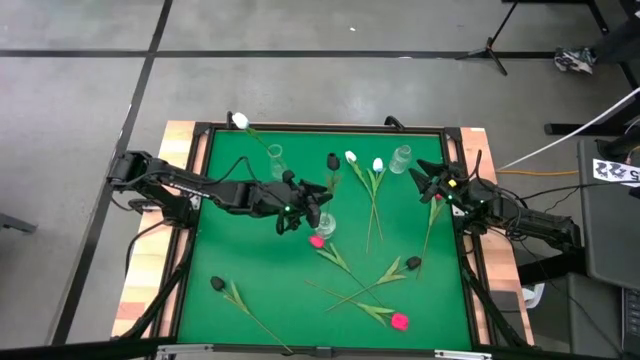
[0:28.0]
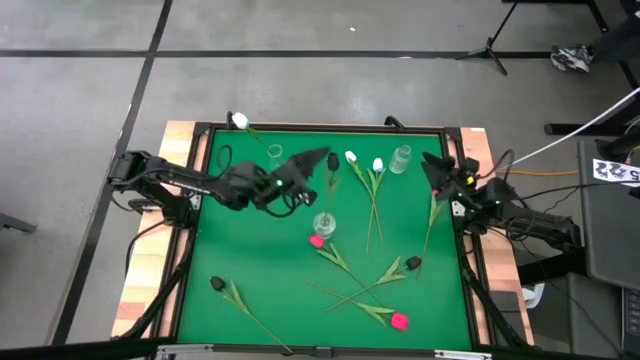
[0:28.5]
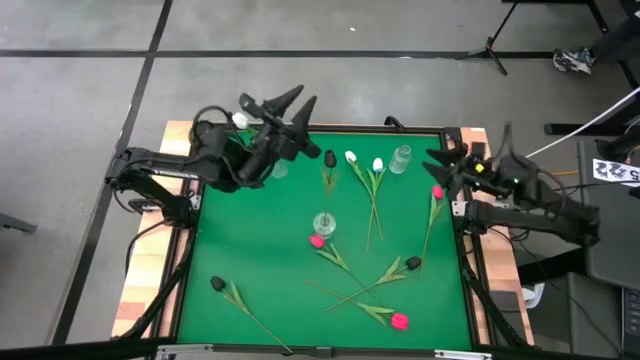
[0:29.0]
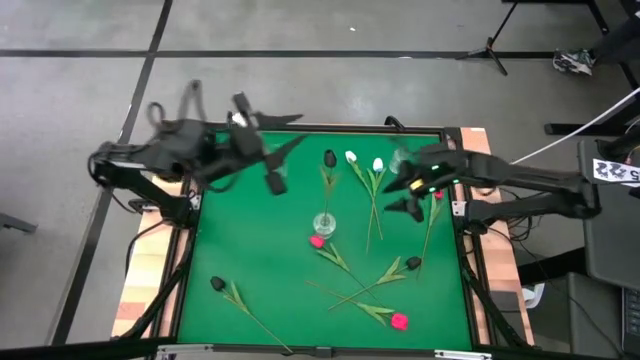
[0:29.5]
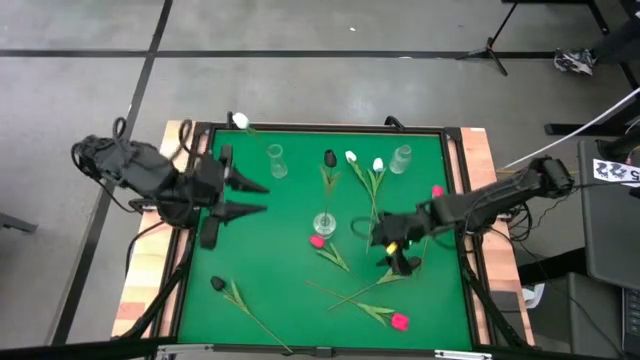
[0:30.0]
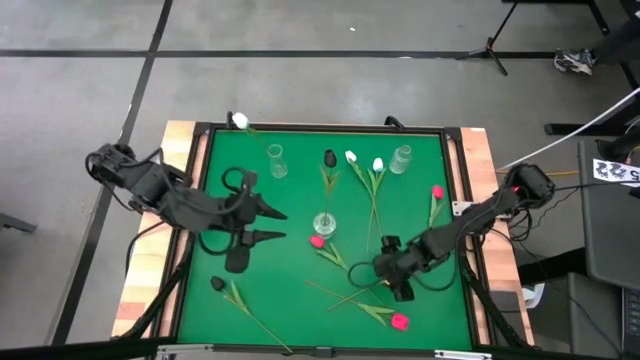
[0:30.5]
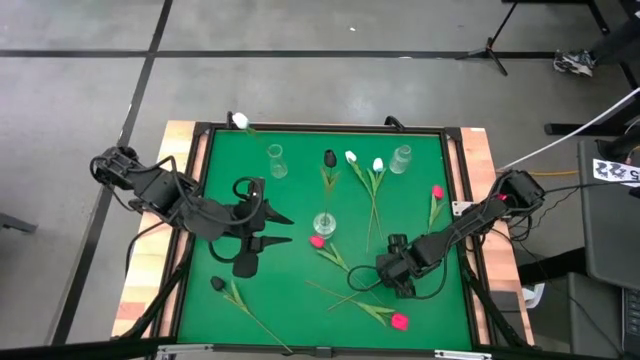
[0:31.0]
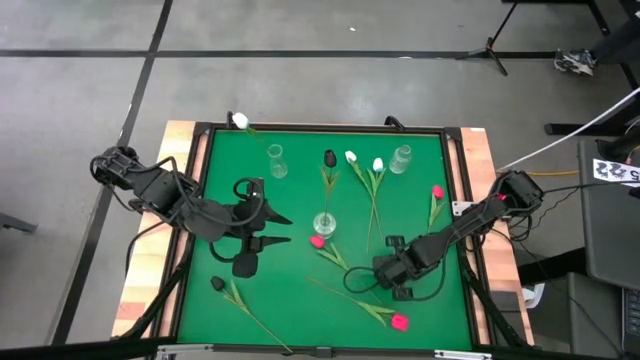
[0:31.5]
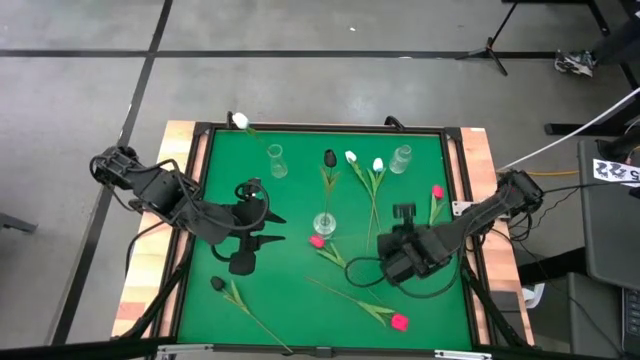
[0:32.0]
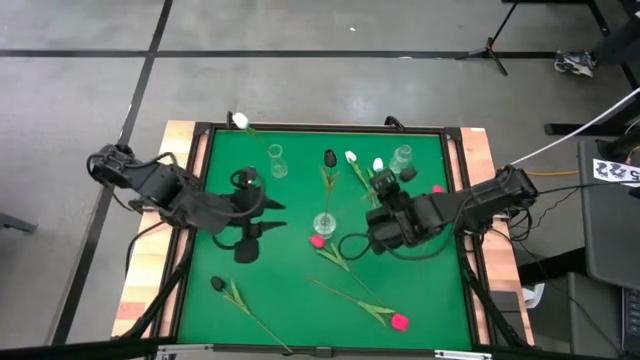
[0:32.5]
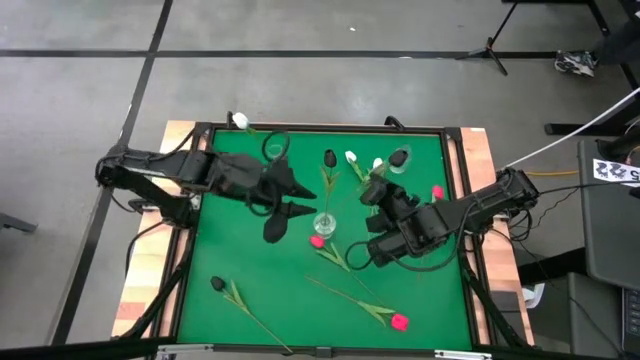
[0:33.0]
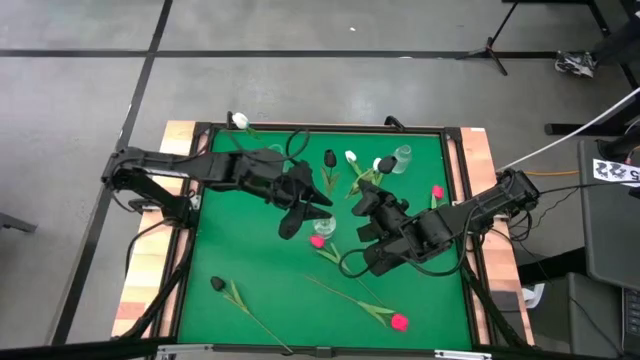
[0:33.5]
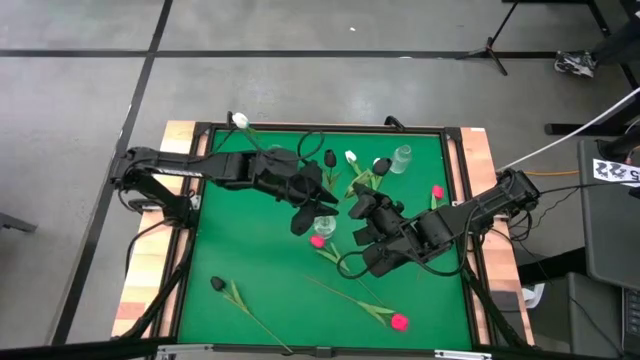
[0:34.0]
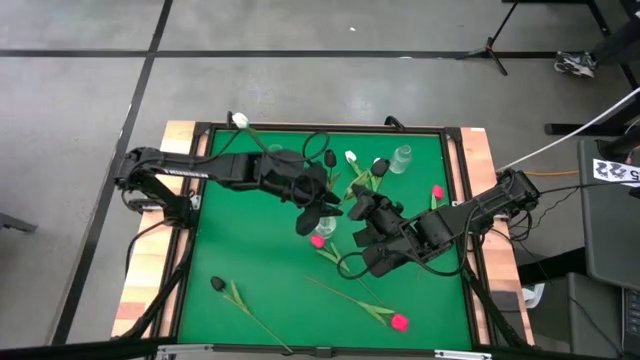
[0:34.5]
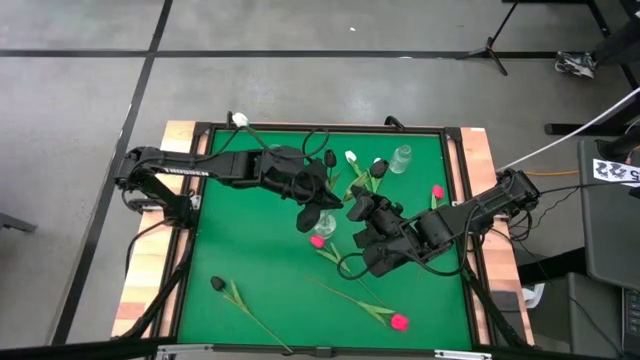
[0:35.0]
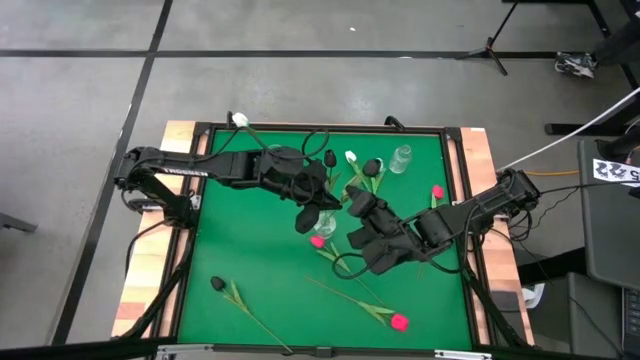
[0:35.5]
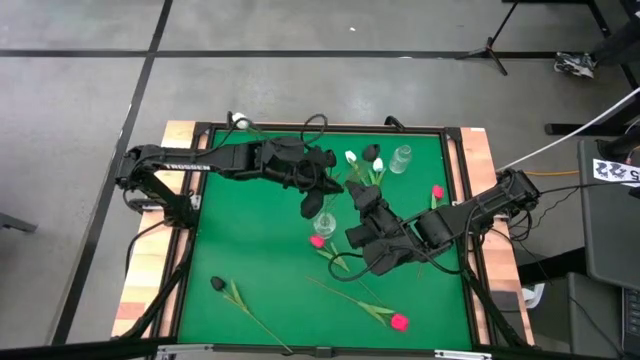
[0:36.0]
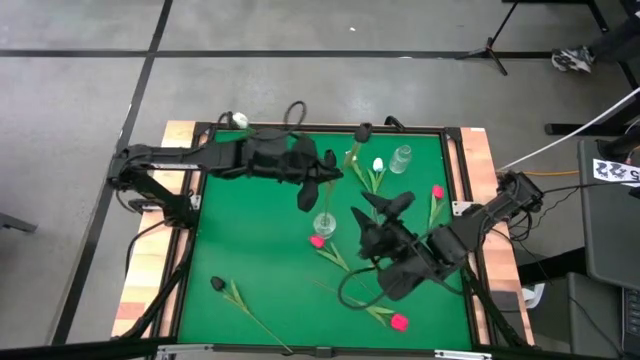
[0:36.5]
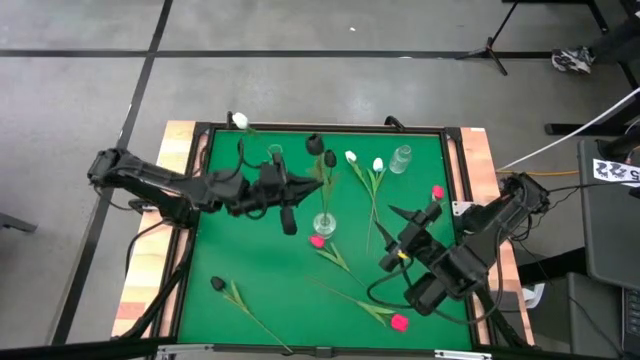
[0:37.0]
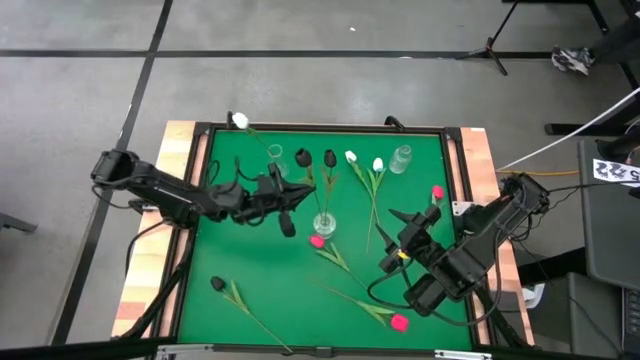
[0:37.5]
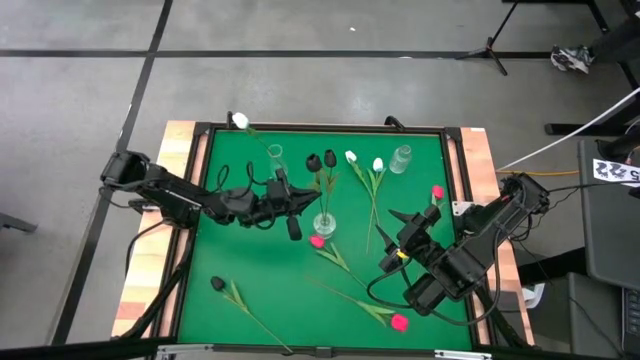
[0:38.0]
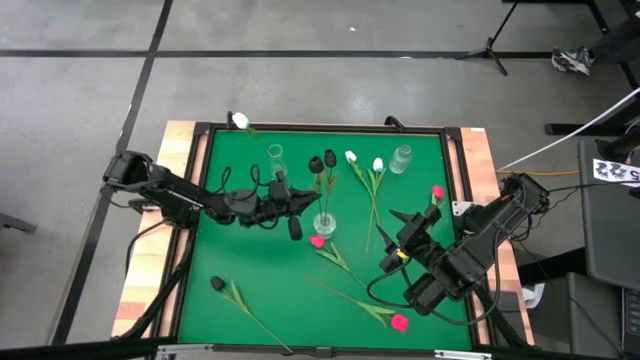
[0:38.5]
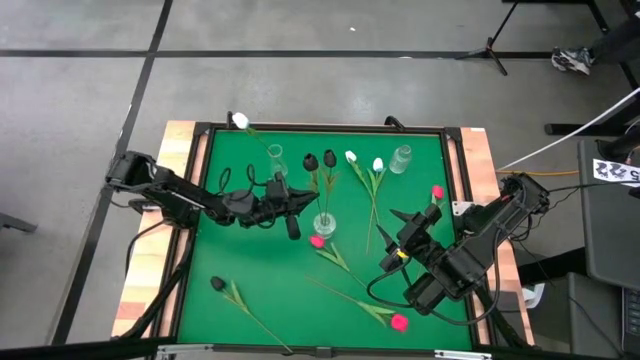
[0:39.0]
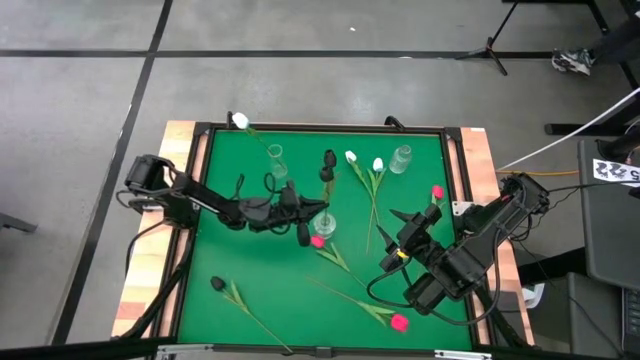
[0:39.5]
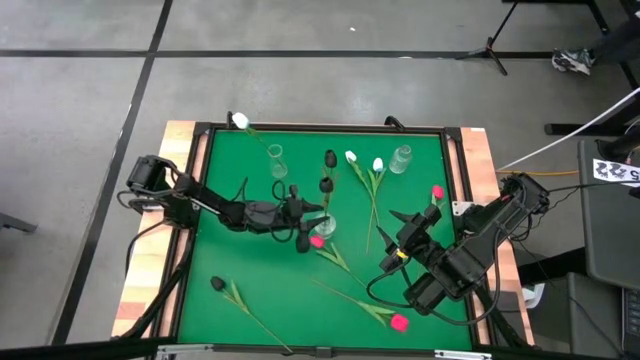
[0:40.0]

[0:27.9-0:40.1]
Task: Sort flowers into vase by color
Put the right black tulip into the bottom transparent vase

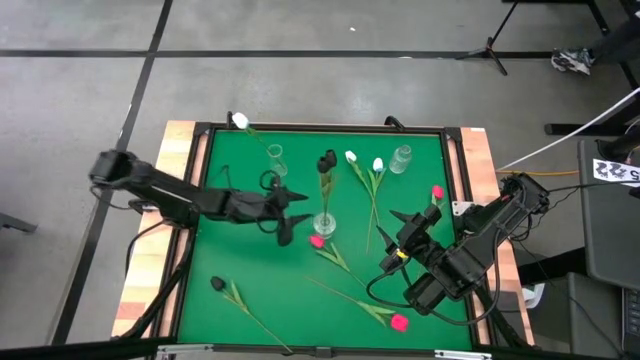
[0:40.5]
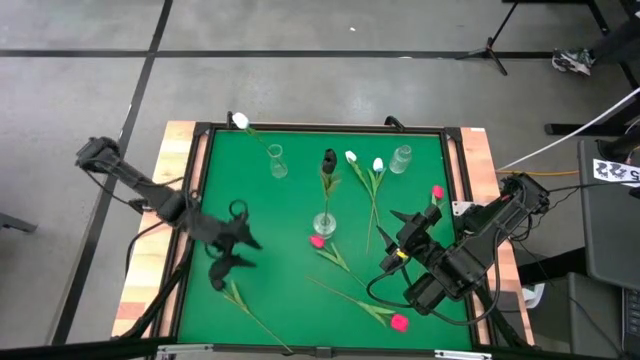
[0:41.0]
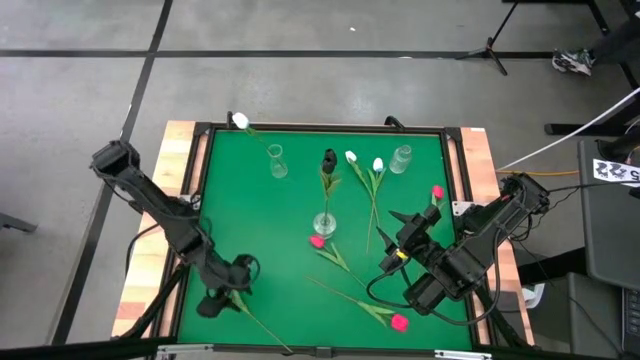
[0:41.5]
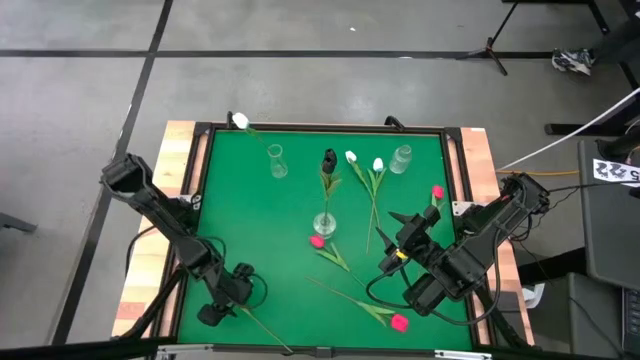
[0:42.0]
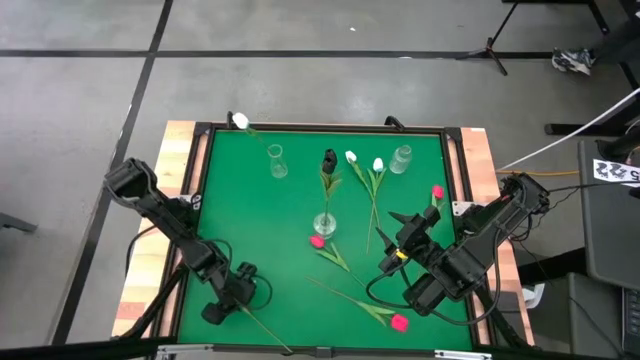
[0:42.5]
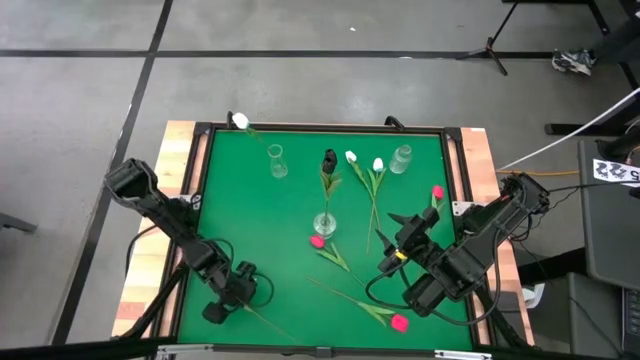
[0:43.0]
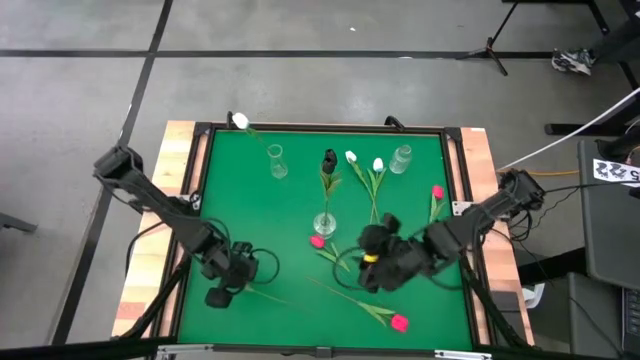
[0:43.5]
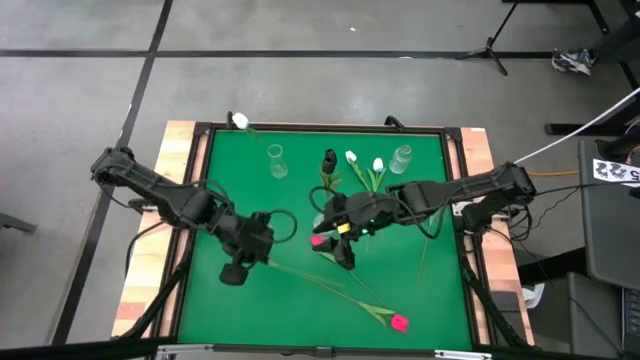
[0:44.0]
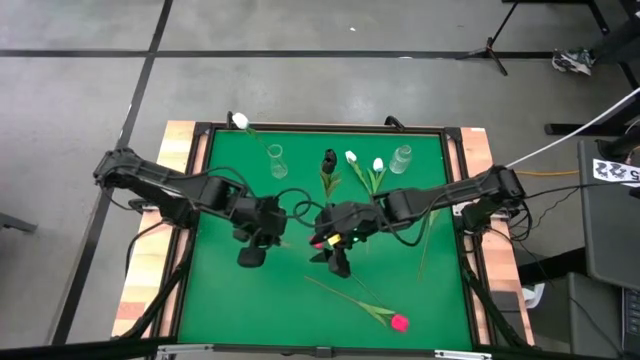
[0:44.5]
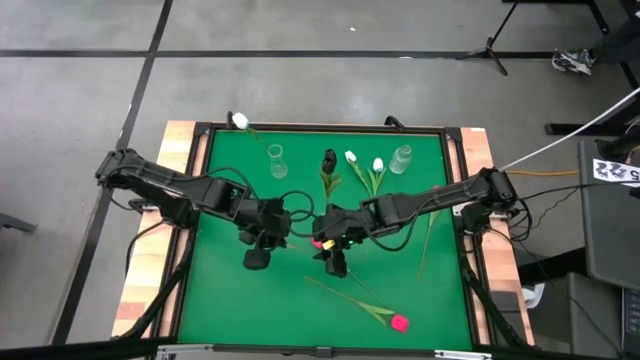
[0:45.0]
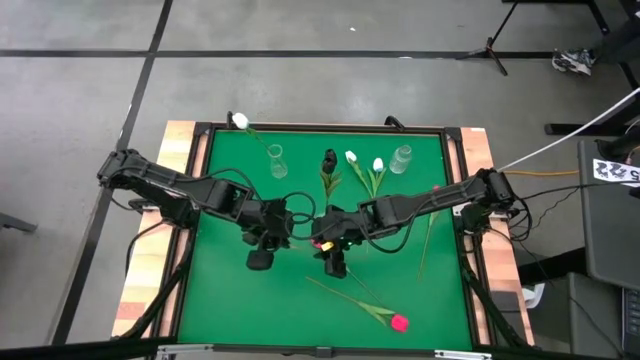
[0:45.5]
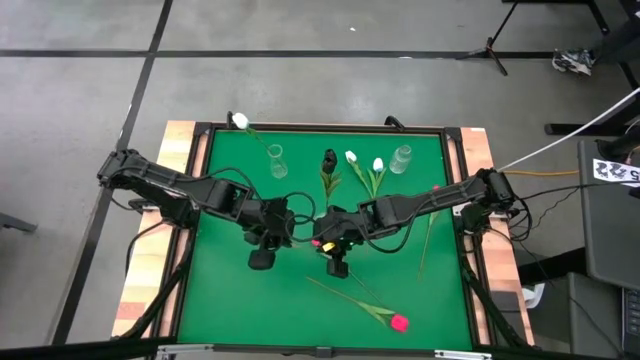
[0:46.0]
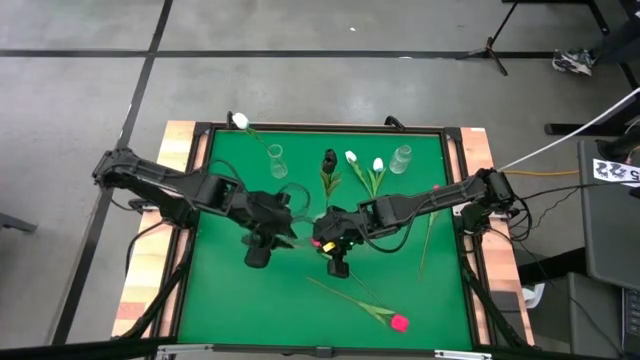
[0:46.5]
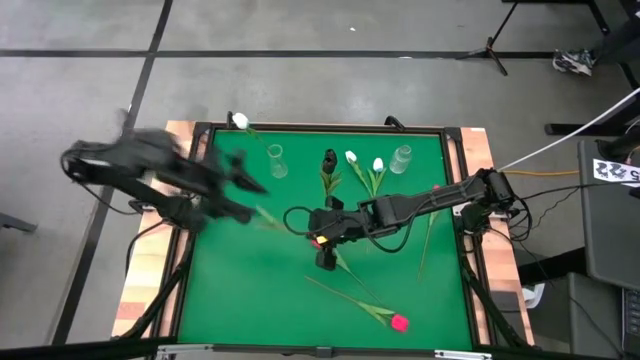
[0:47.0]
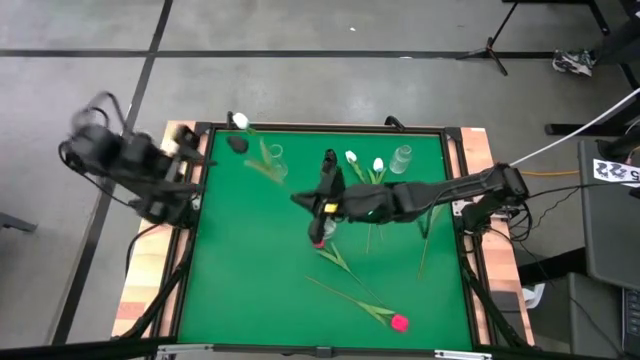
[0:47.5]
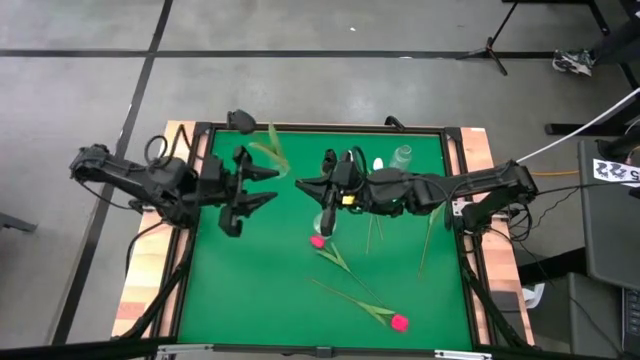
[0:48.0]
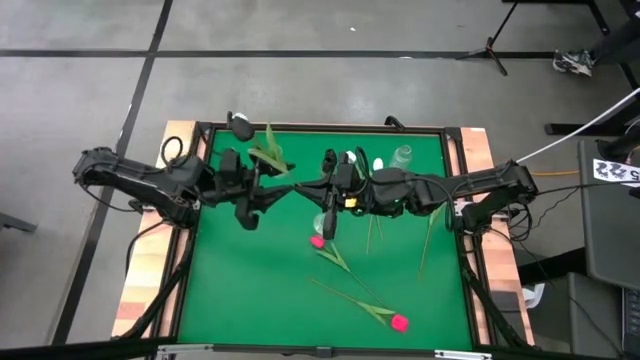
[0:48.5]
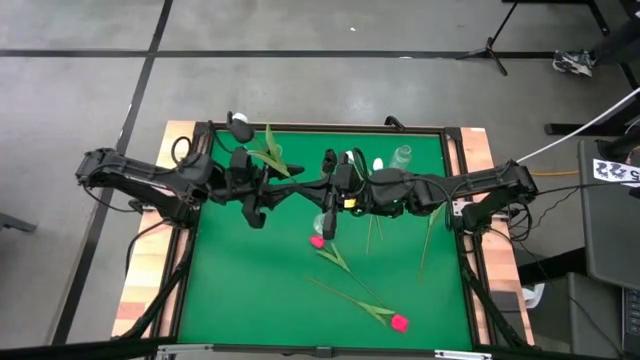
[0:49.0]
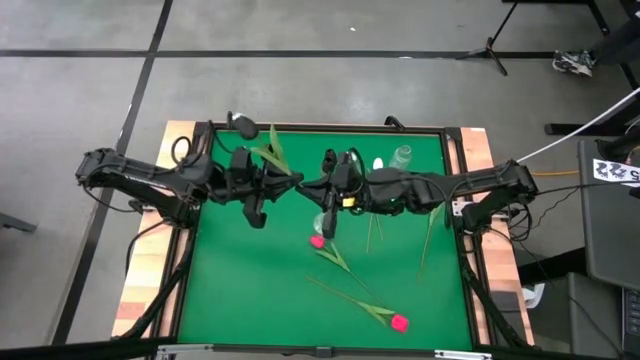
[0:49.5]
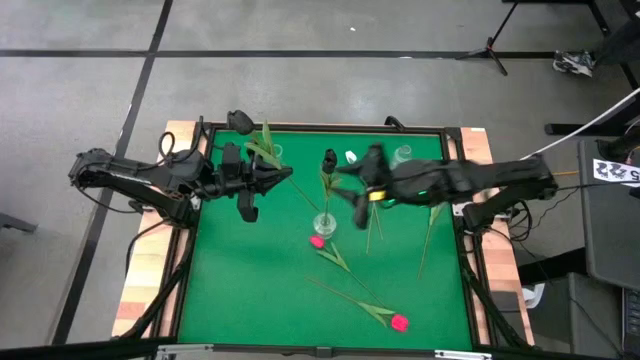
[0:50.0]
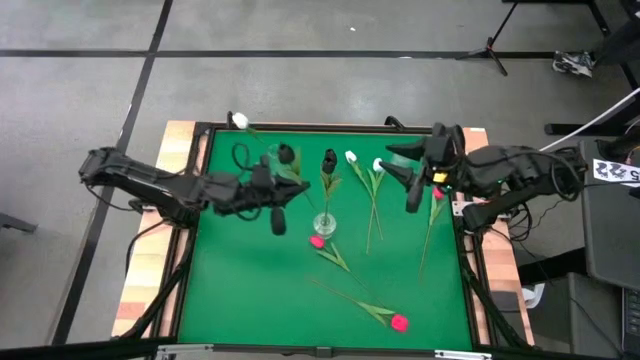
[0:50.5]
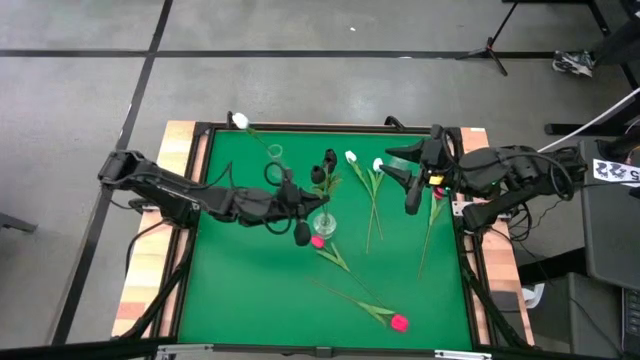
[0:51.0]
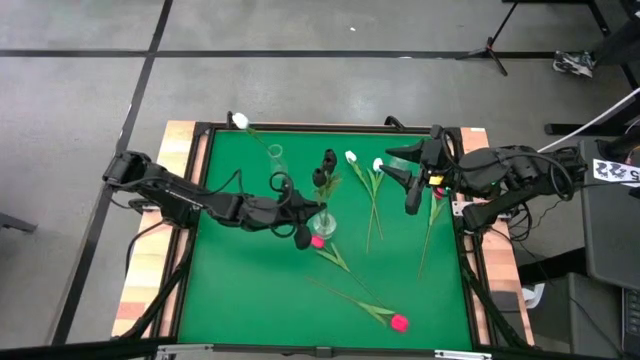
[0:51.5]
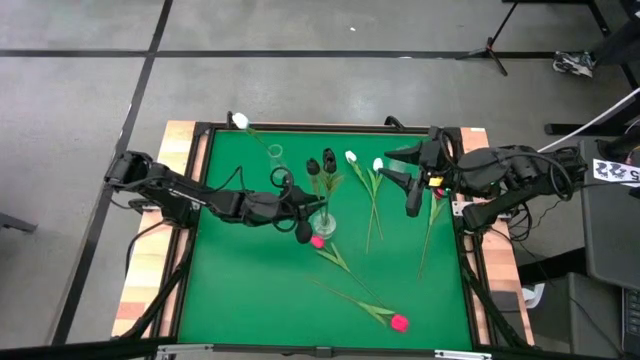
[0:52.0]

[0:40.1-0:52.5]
Put the black tulip into the bottom transparent vase
